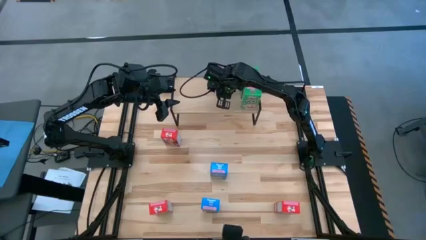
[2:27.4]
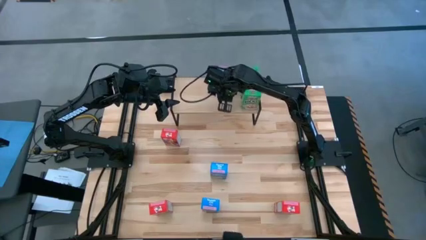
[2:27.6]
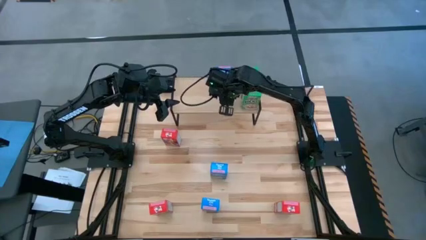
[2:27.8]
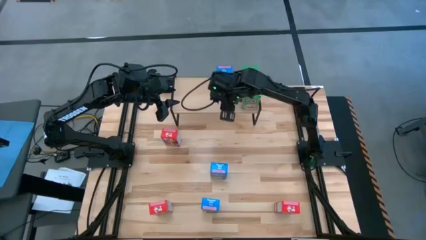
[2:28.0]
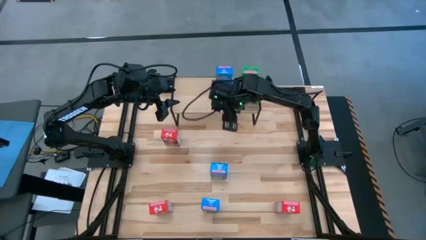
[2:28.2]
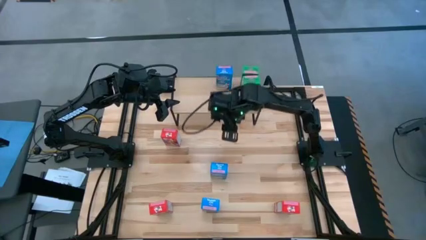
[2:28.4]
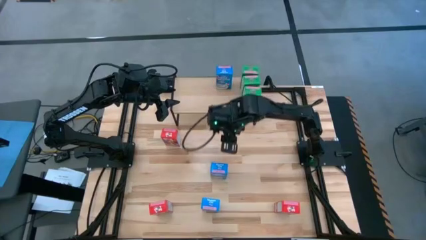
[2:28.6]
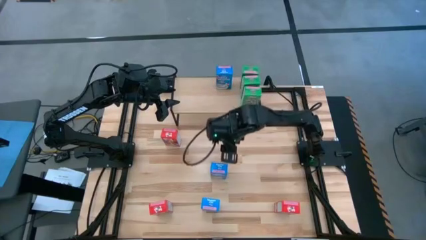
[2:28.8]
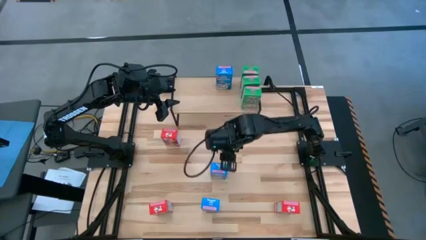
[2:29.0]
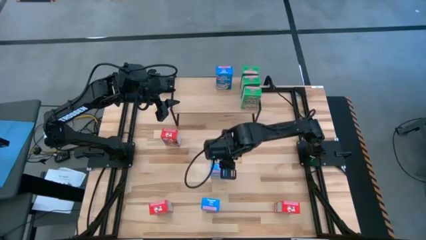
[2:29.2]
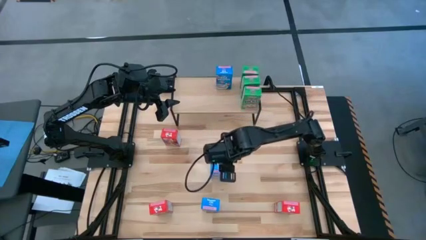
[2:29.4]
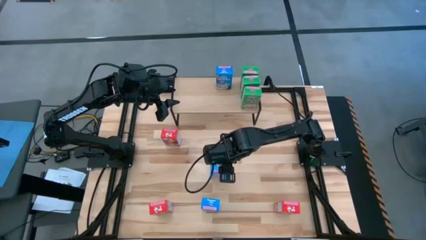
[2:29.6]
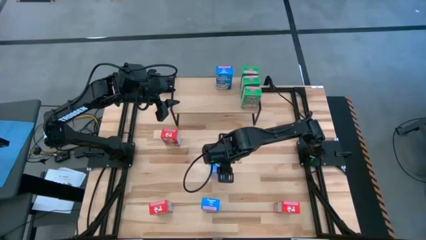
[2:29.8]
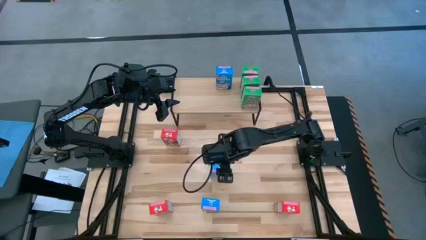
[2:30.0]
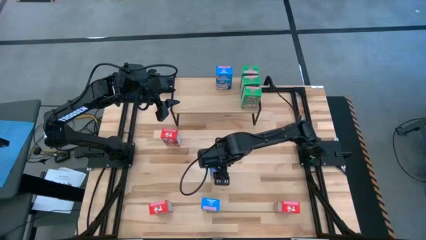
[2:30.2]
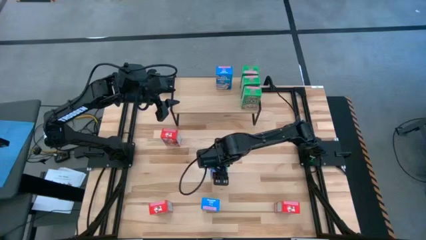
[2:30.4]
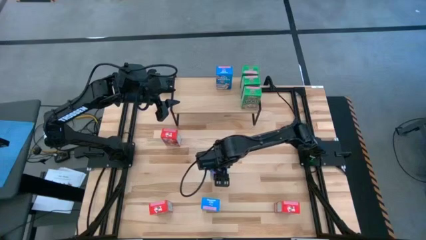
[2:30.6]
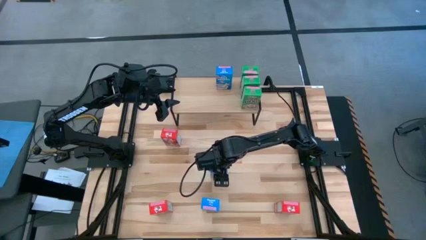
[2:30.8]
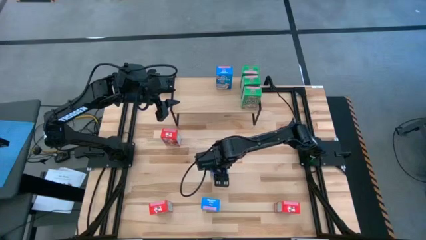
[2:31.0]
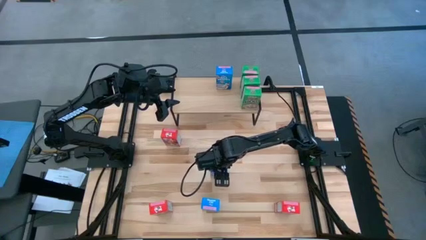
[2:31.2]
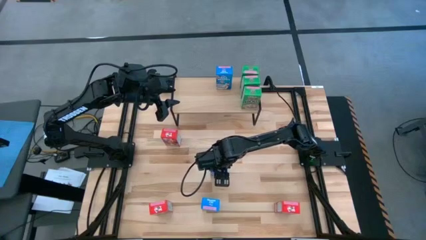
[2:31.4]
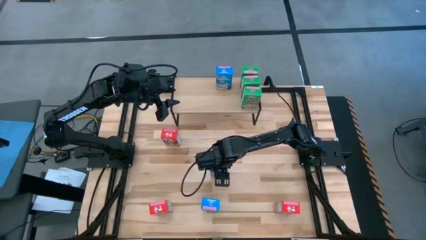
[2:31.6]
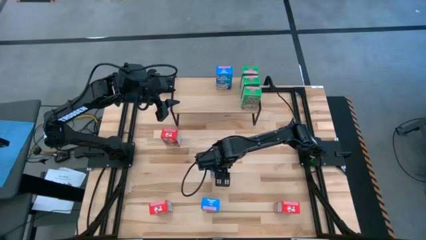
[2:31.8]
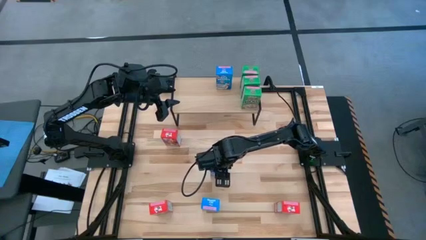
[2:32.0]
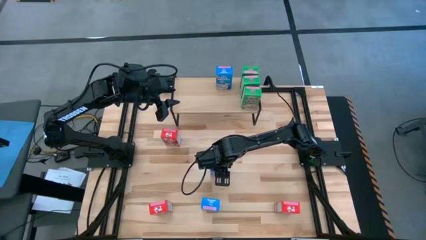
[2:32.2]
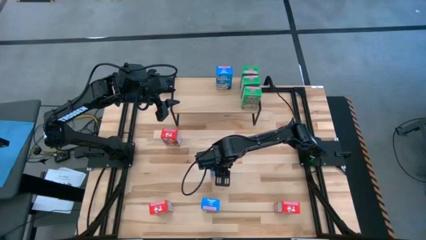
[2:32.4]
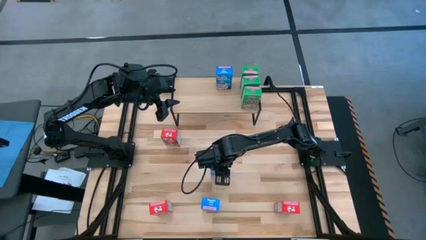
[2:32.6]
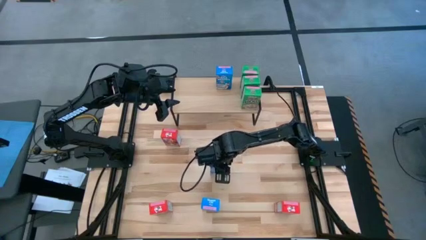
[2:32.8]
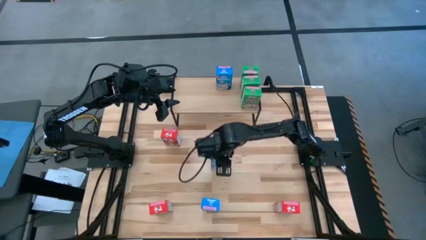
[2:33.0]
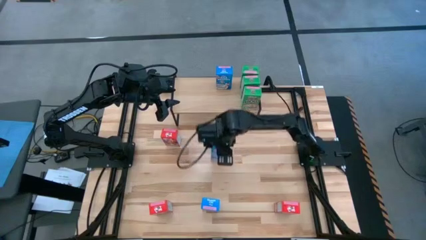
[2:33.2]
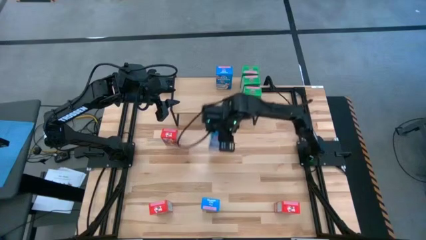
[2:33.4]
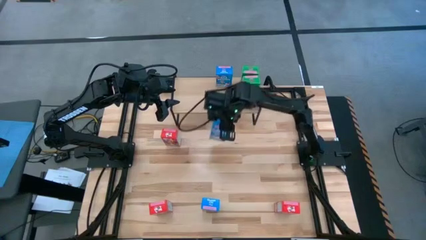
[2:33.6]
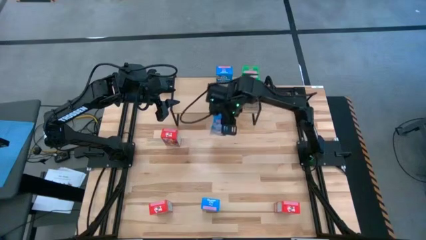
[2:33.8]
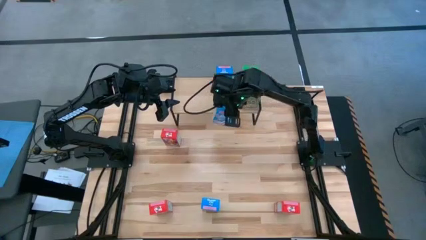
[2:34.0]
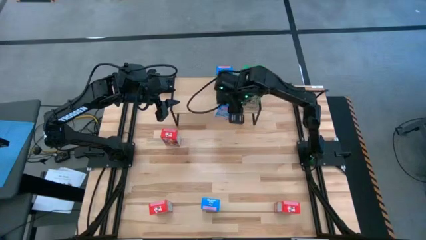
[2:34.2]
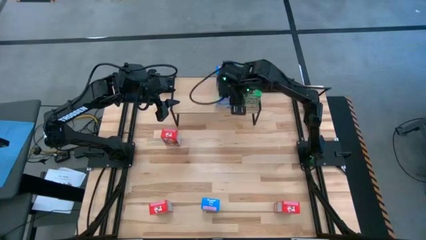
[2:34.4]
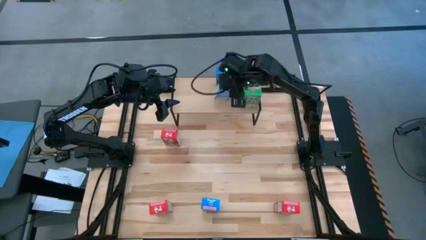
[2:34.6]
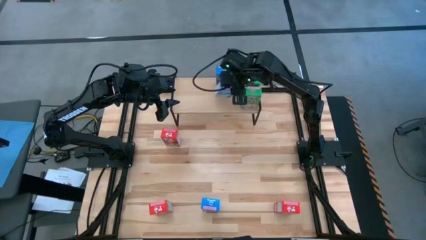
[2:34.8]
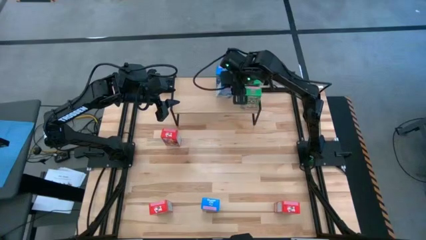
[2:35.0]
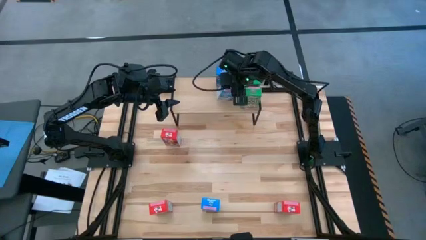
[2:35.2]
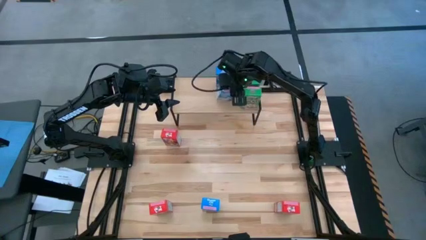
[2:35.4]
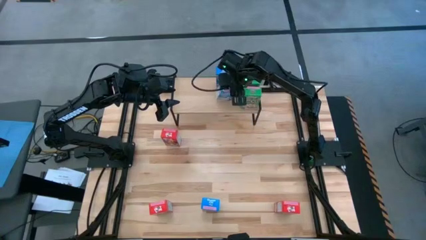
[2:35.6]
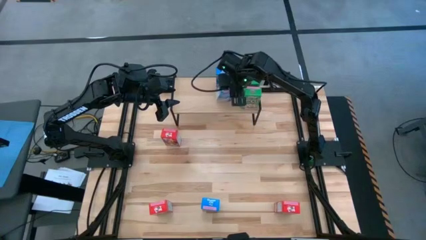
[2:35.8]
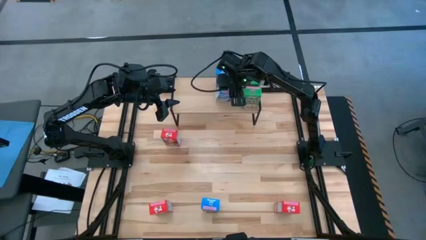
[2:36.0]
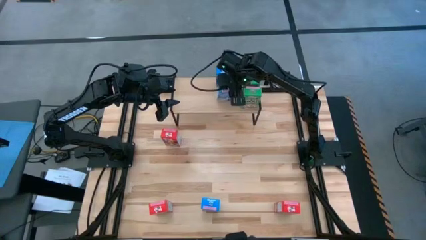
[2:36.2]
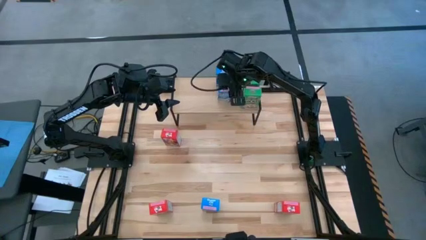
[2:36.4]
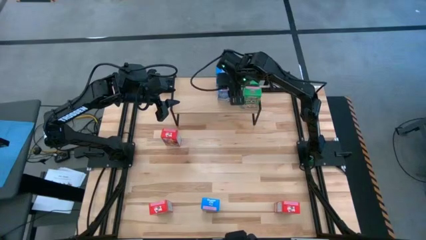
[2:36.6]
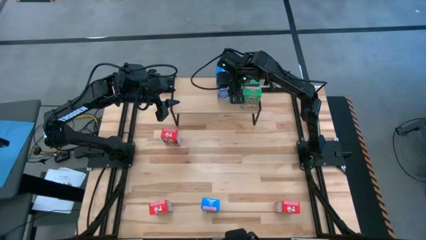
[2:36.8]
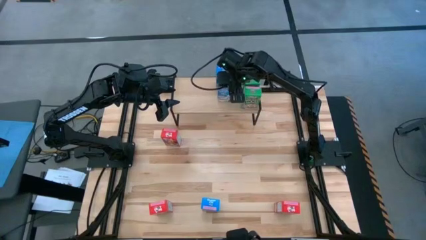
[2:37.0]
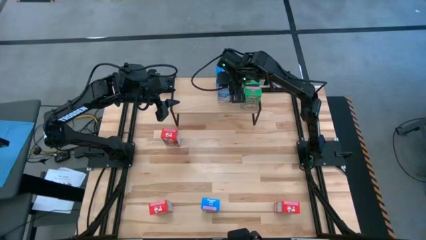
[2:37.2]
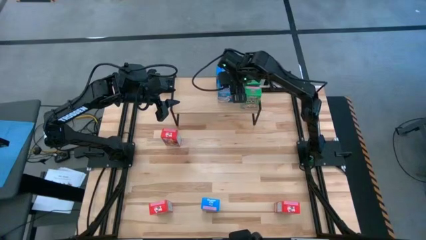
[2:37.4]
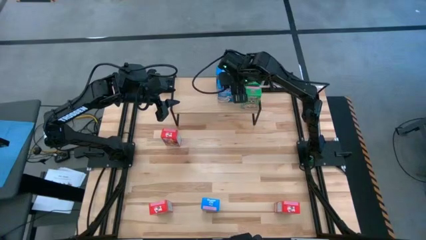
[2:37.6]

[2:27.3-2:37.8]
Task: Stack cereal on shelf
Put the top blue cereal box on the shelf aligned with the other blue cereal box

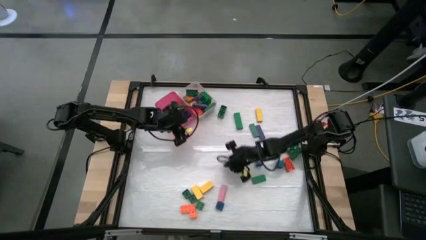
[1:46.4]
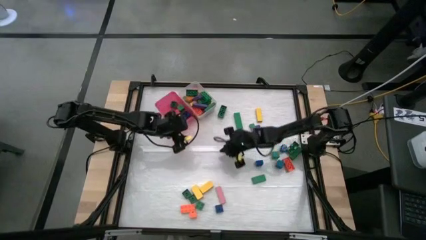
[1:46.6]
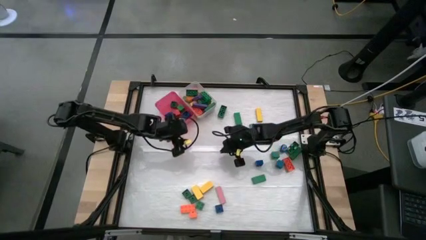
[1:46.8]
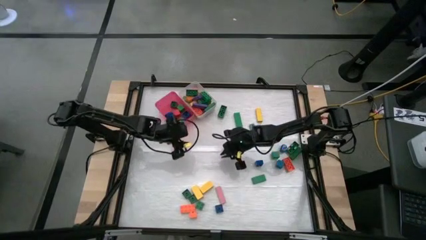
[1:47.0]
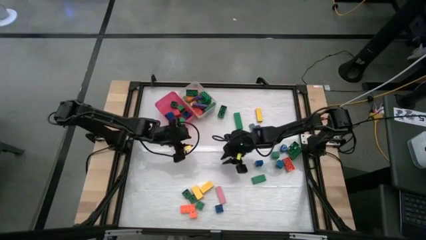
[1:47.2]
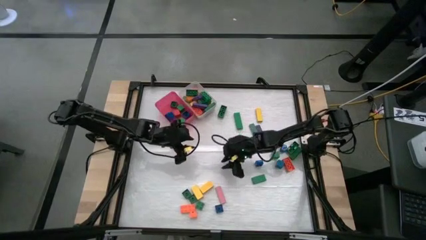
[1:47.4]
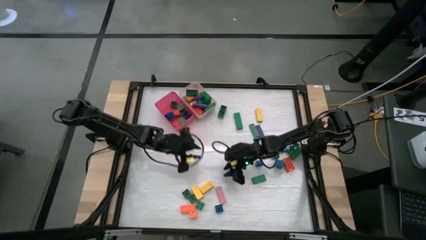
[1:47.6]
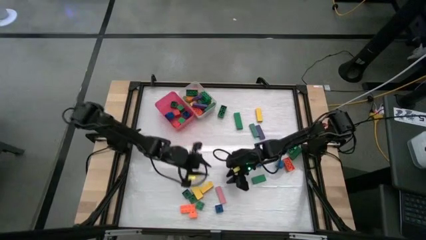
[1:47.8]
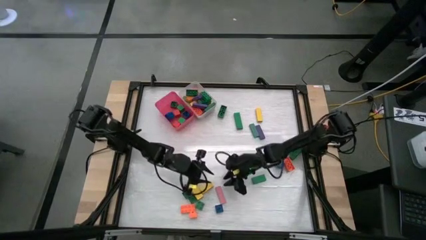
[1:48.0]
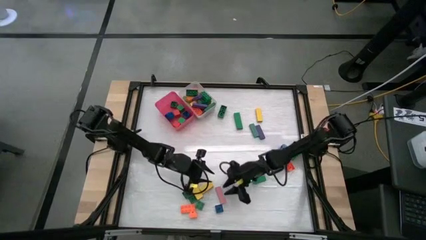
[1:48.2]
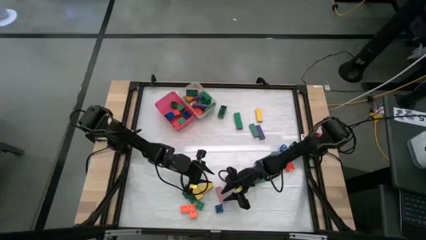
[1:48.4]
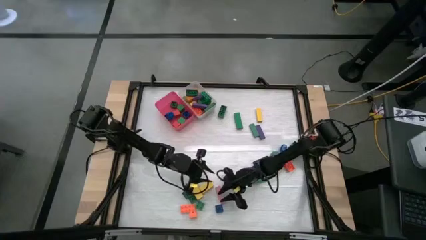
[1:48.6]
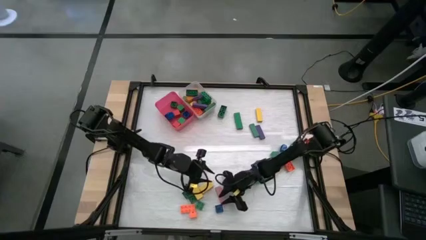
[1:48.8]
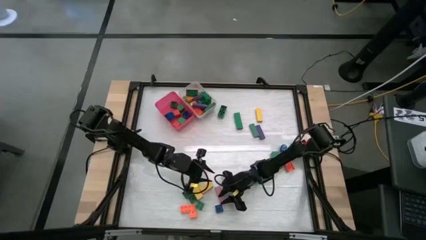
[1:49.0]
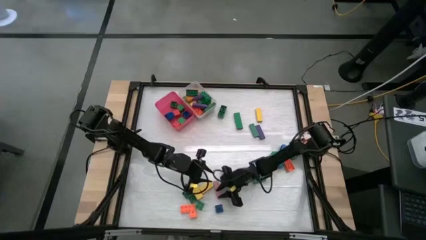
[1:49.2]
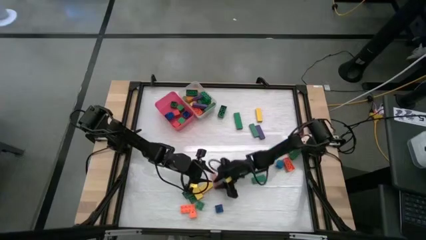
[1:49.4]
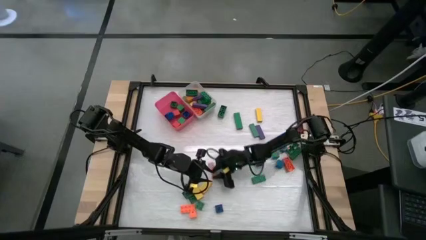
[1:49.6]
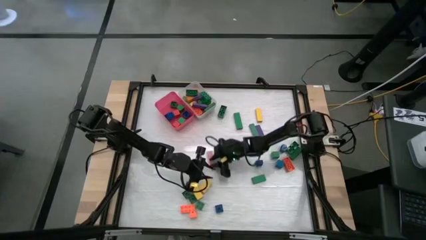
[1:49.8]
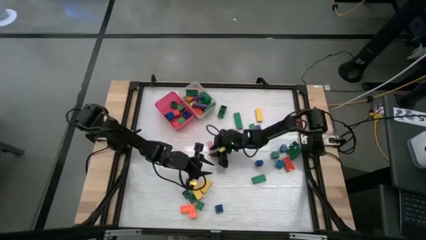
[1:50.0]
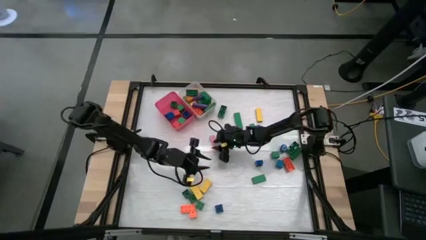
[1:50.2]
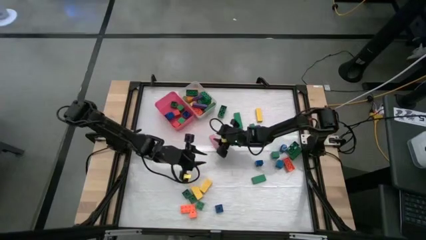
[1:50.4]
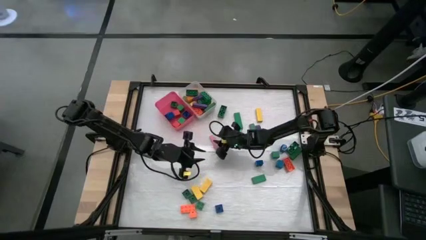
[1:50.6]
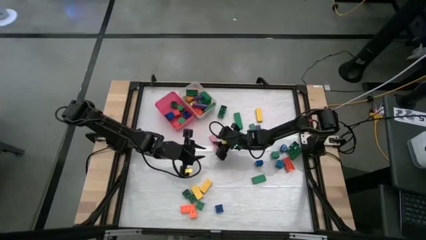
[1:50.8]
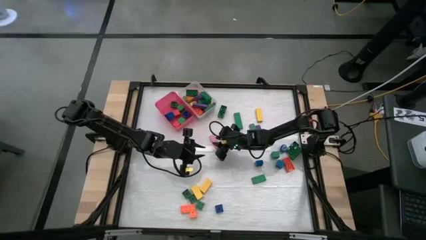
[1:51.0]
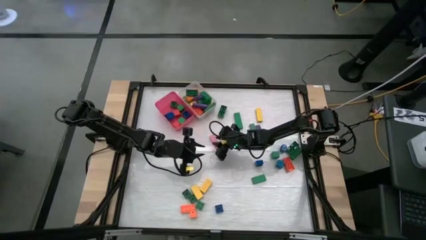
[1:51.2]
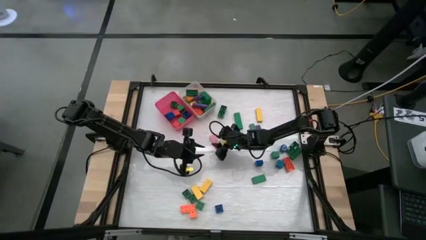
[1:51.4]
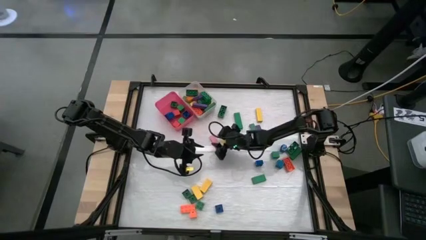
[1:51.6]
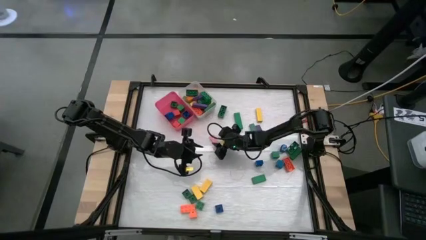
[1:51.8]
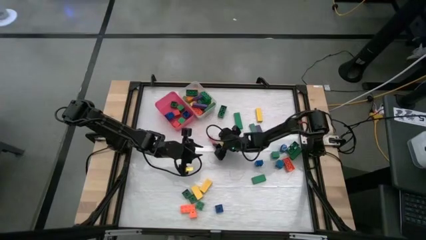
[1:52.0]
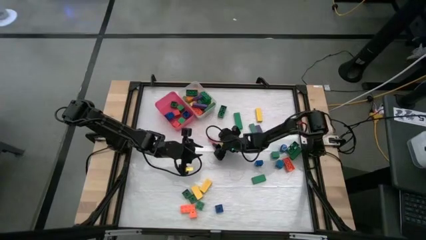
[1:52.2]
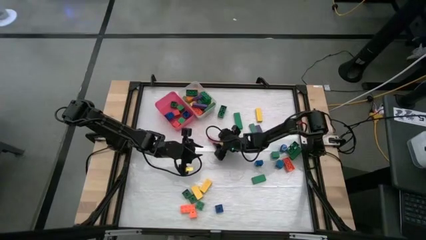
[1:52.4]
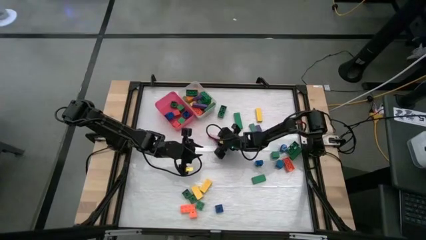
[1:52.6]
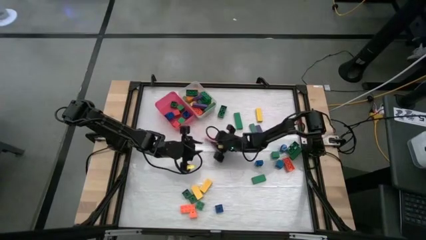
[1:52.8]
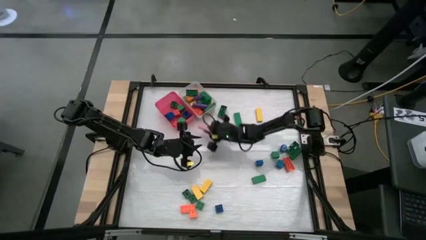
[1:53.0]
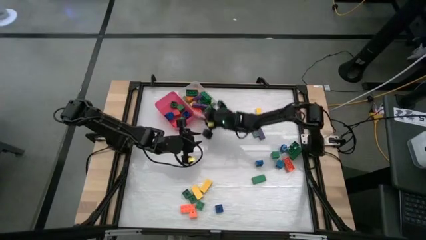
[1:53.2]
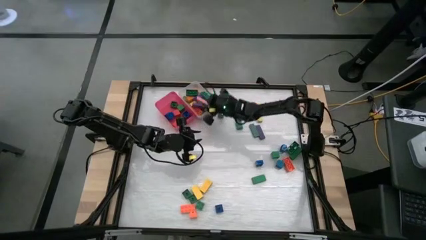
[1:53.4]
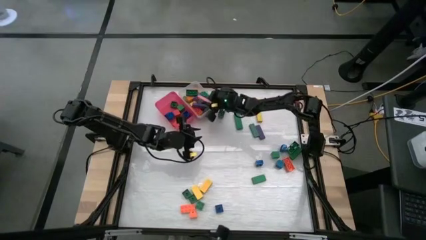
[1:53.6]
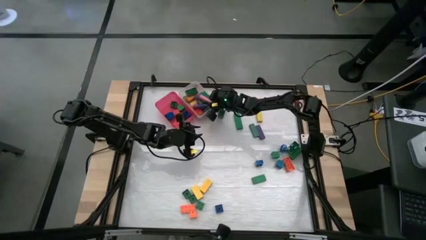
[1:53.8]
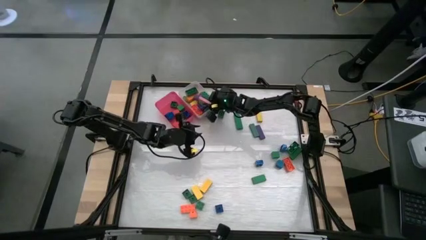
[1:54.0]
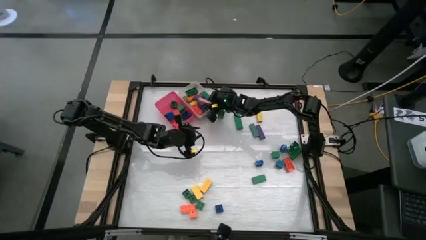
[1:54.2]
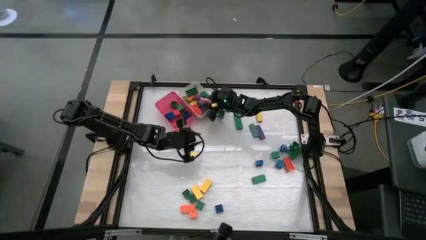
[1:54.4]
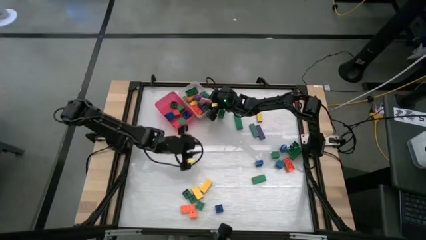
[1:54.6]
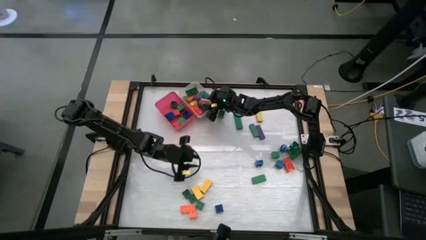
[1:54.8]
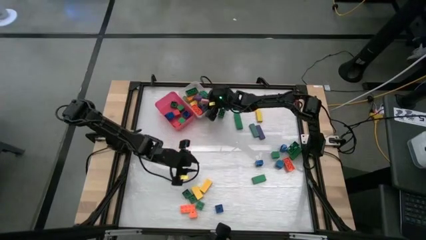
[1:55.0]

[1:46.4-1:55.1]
Task: Sort blocks by size
Put the big pink block into the white bin
